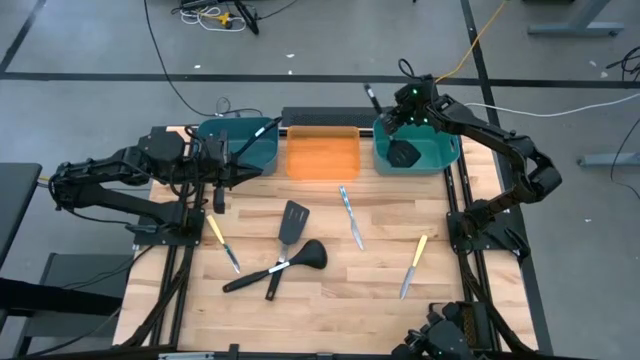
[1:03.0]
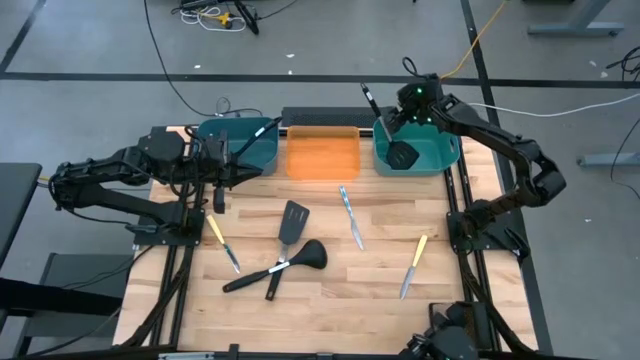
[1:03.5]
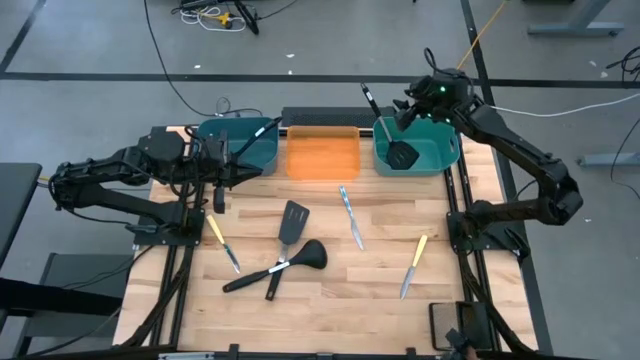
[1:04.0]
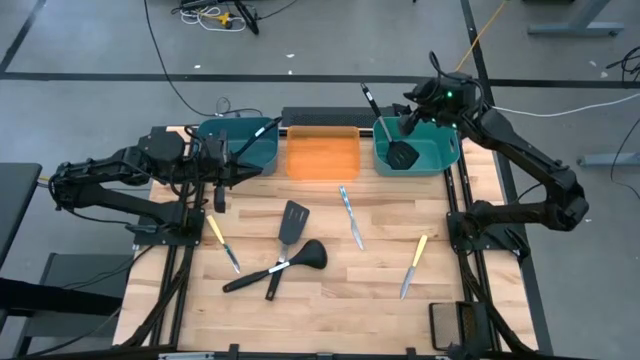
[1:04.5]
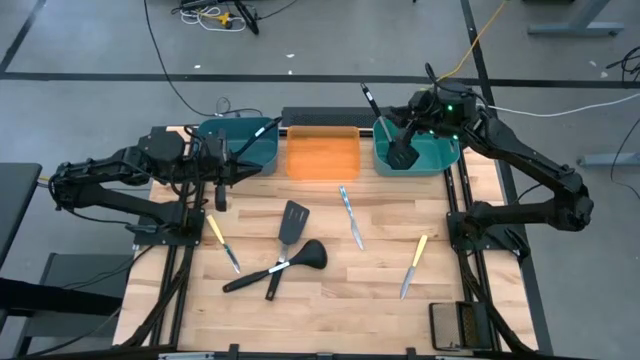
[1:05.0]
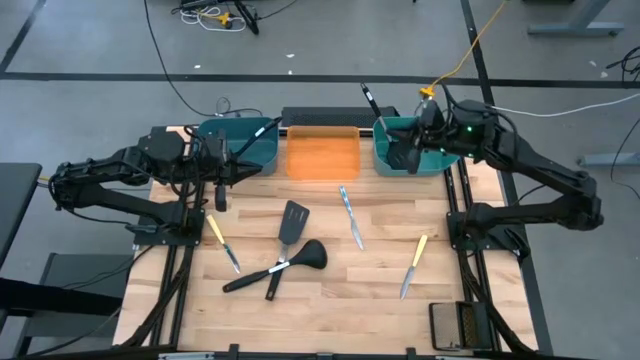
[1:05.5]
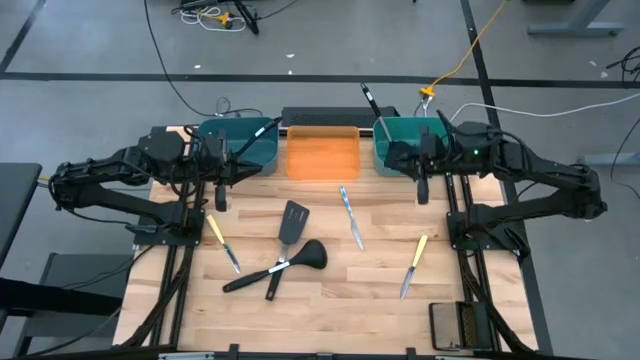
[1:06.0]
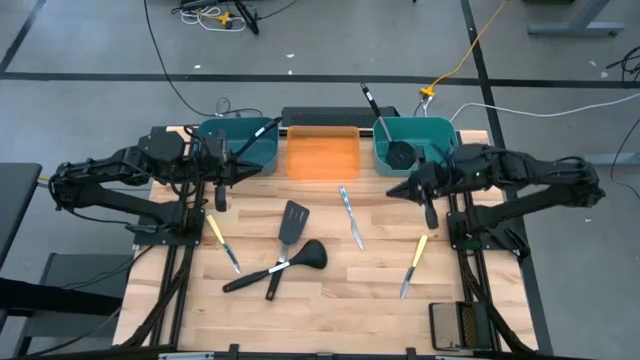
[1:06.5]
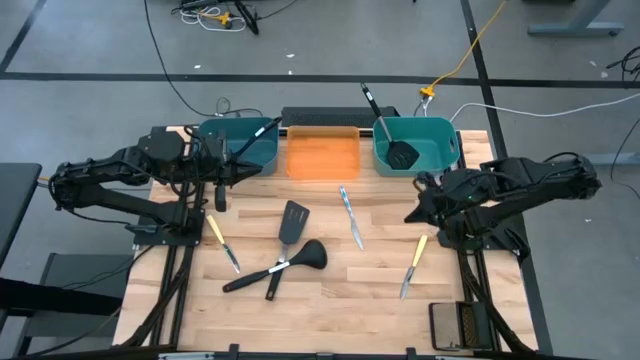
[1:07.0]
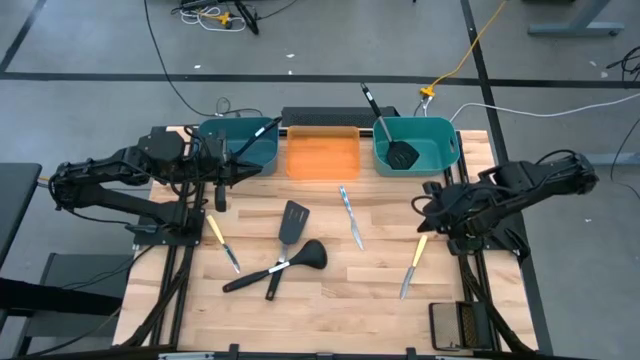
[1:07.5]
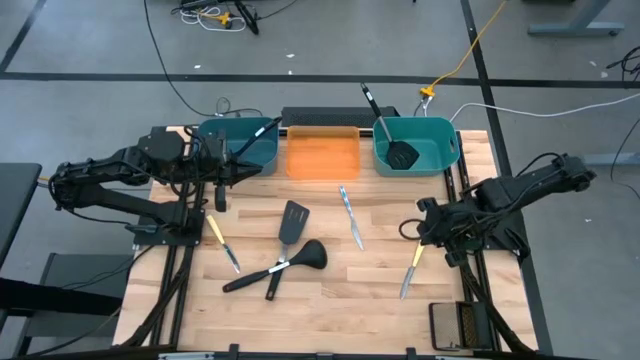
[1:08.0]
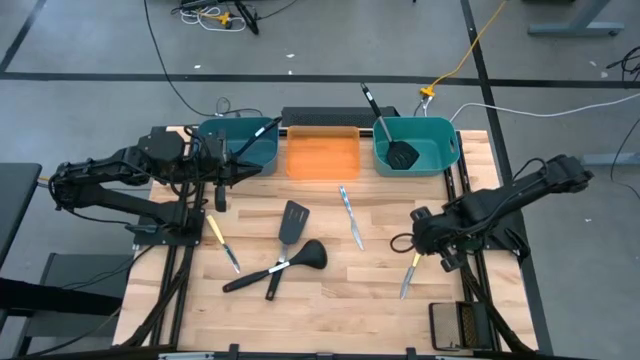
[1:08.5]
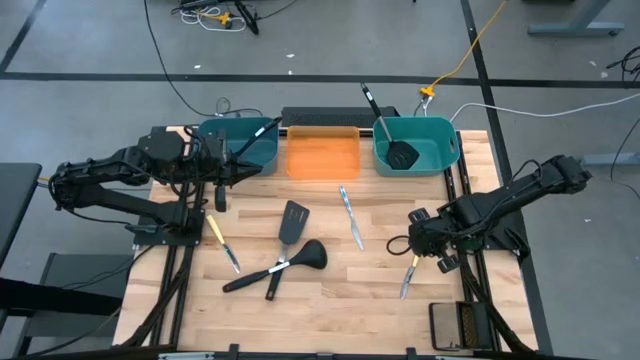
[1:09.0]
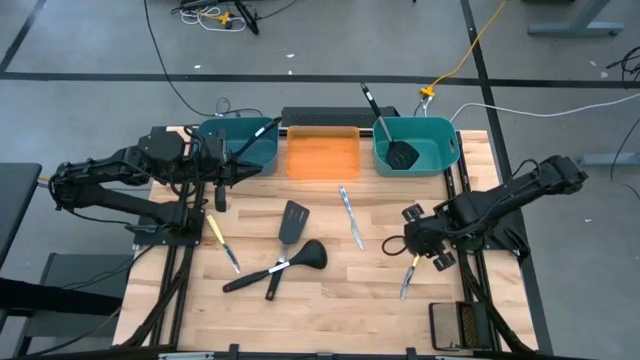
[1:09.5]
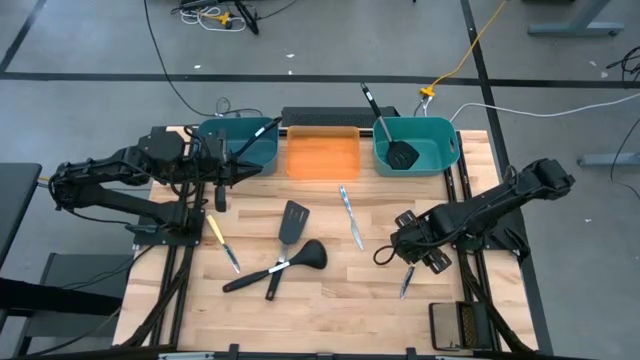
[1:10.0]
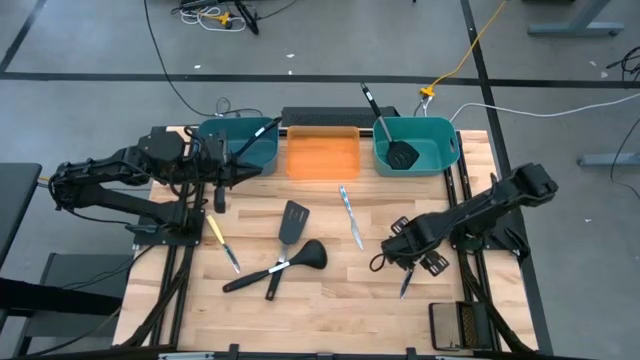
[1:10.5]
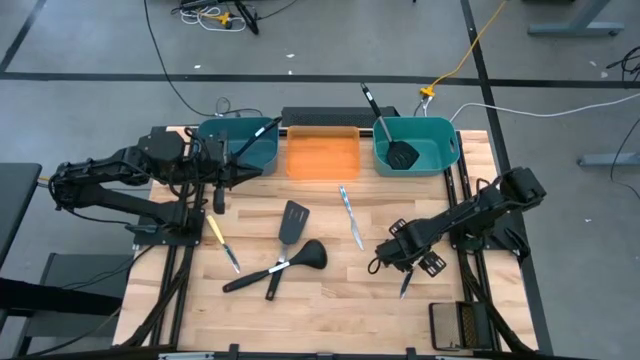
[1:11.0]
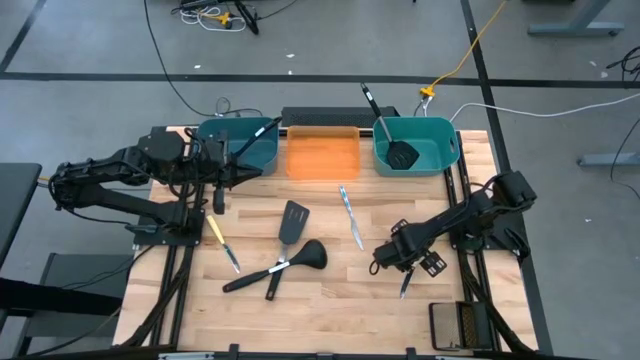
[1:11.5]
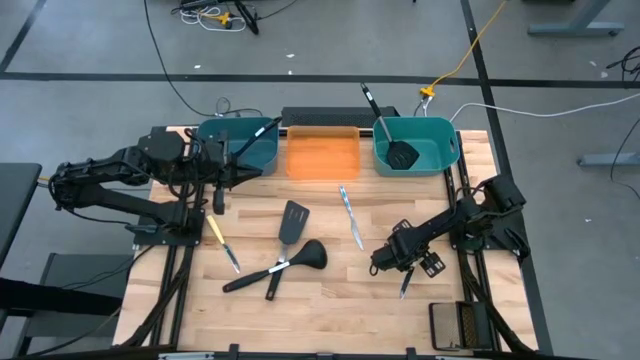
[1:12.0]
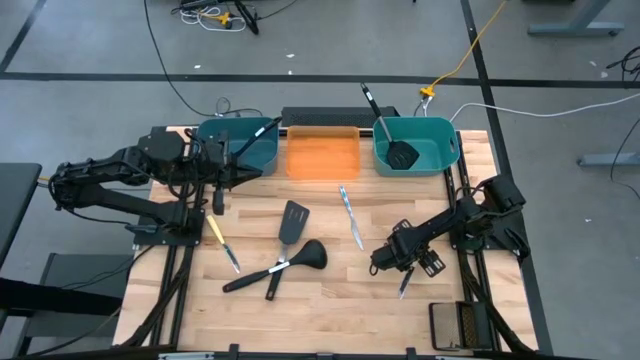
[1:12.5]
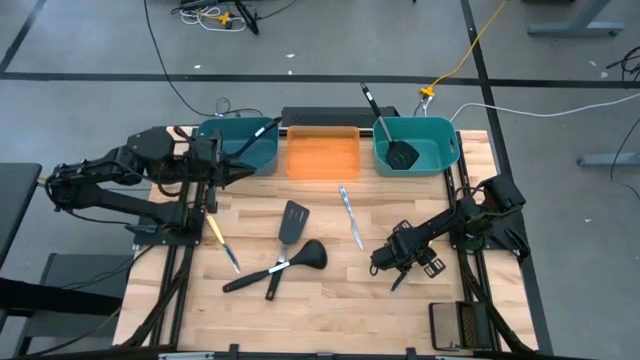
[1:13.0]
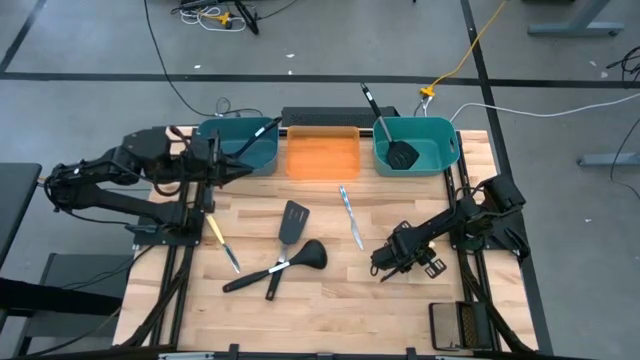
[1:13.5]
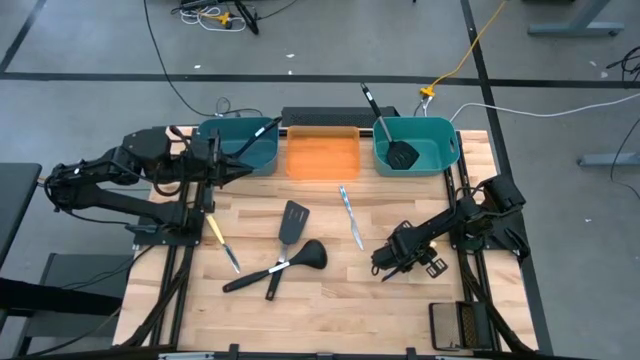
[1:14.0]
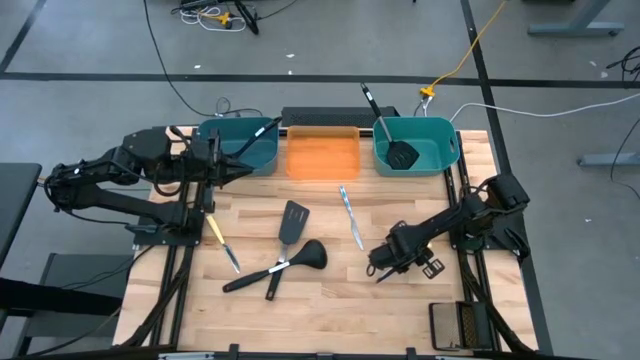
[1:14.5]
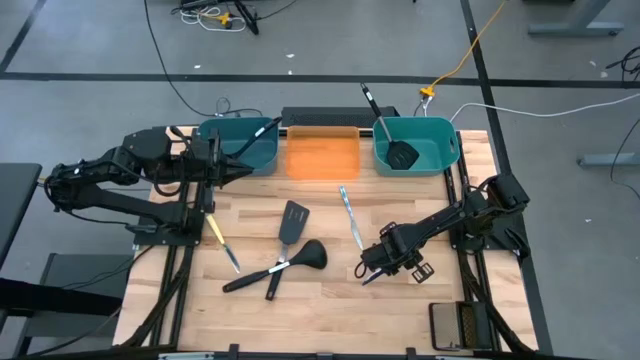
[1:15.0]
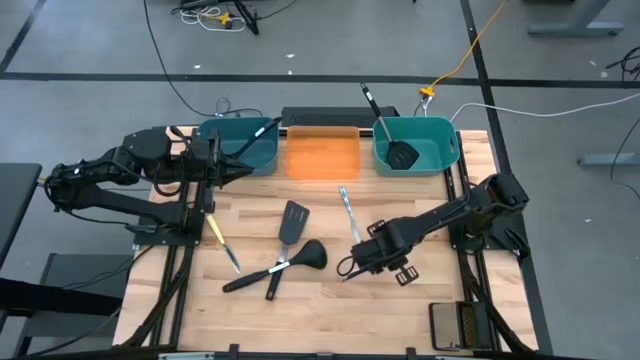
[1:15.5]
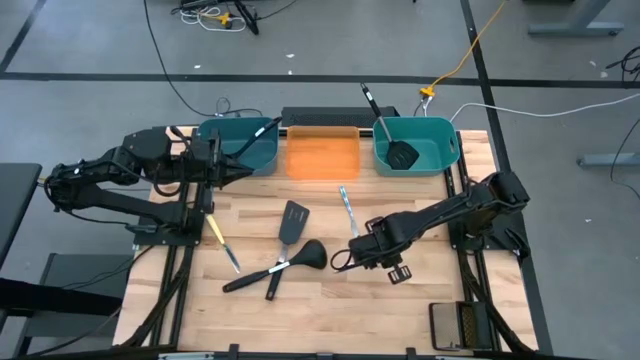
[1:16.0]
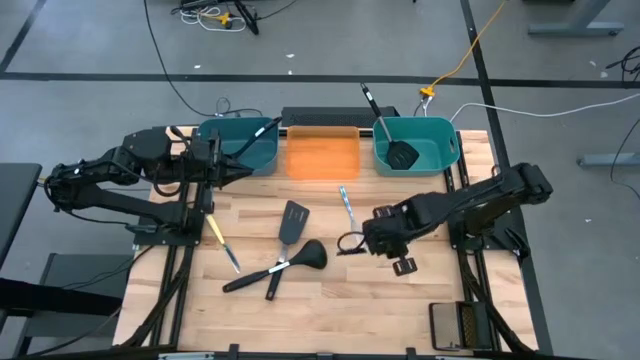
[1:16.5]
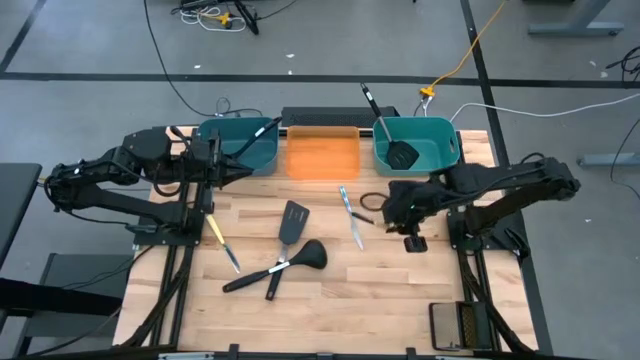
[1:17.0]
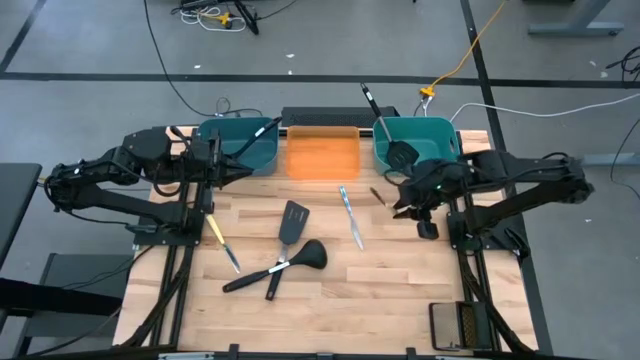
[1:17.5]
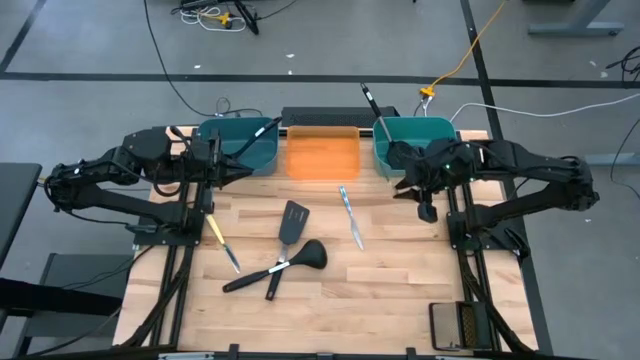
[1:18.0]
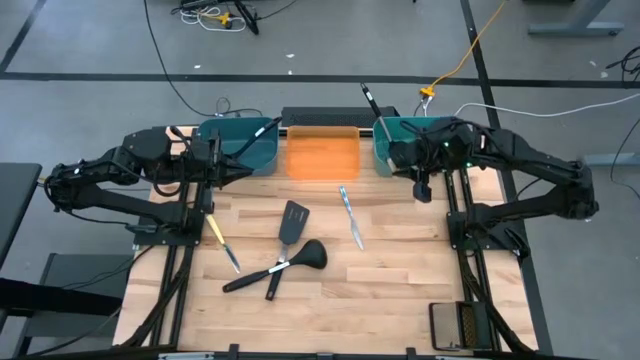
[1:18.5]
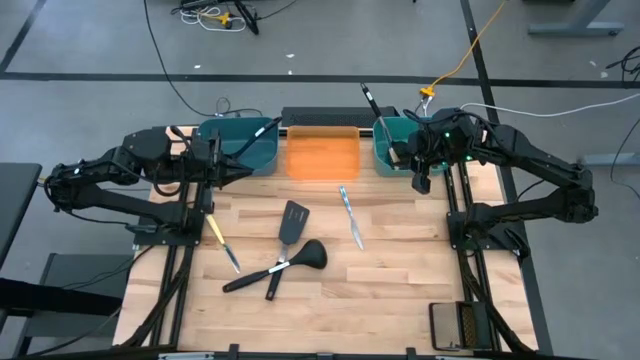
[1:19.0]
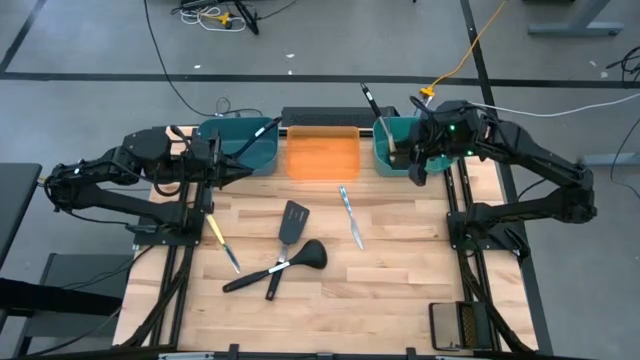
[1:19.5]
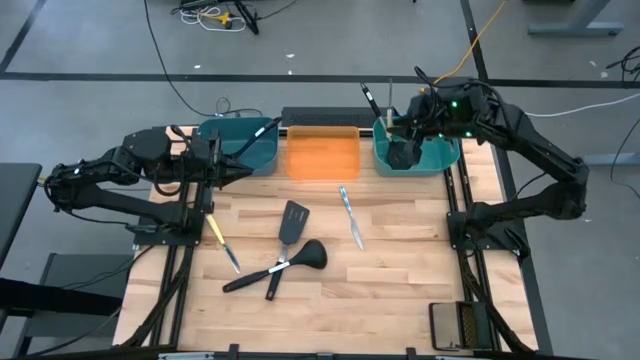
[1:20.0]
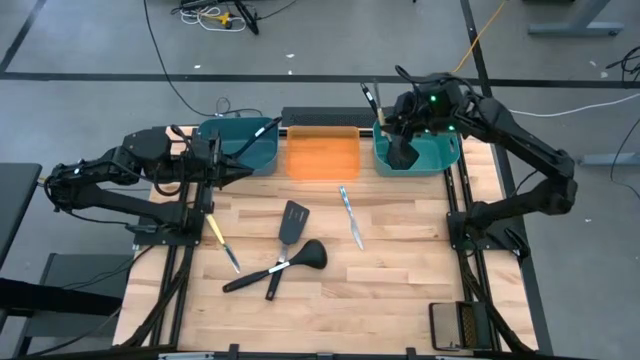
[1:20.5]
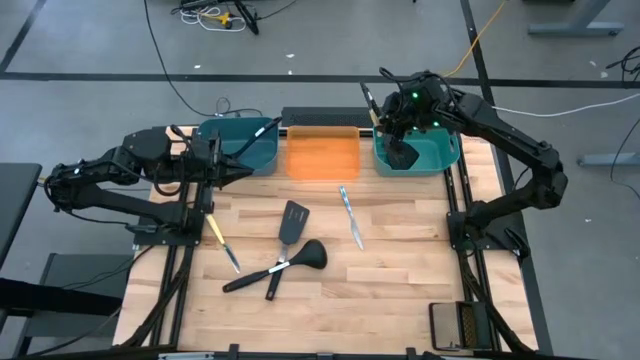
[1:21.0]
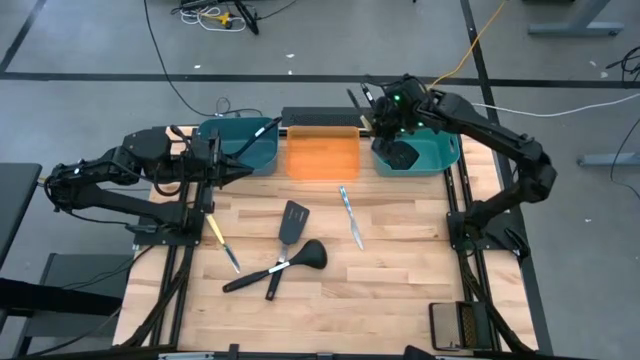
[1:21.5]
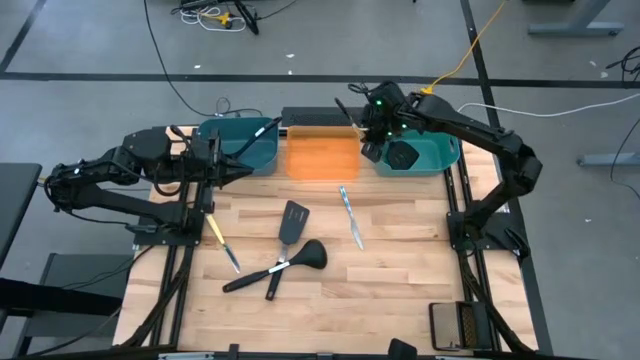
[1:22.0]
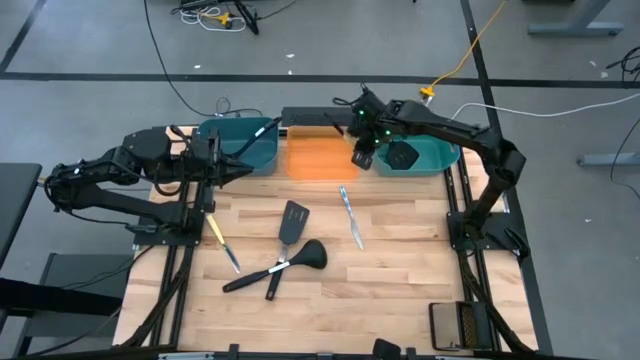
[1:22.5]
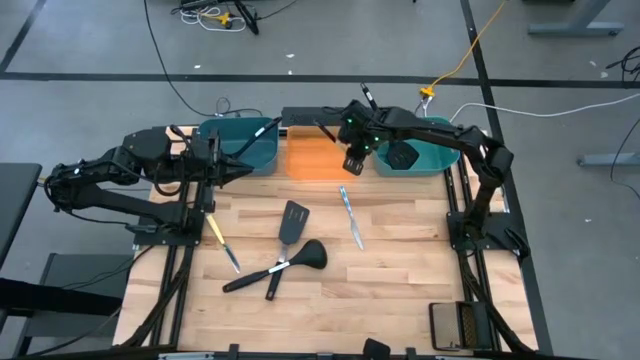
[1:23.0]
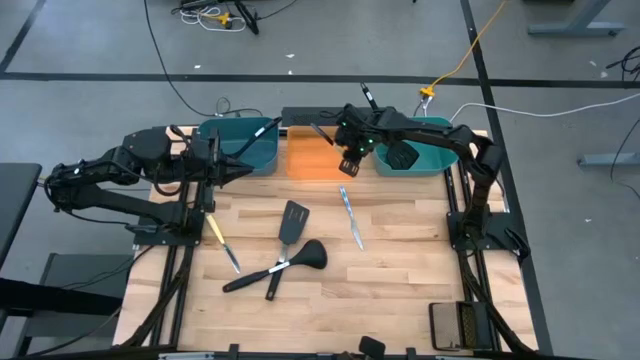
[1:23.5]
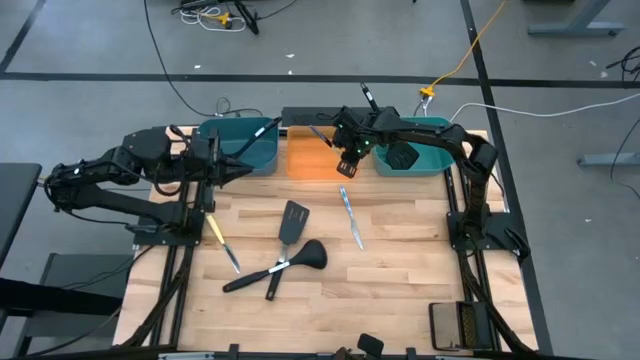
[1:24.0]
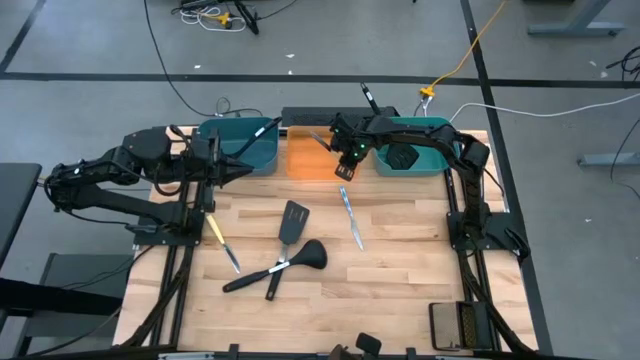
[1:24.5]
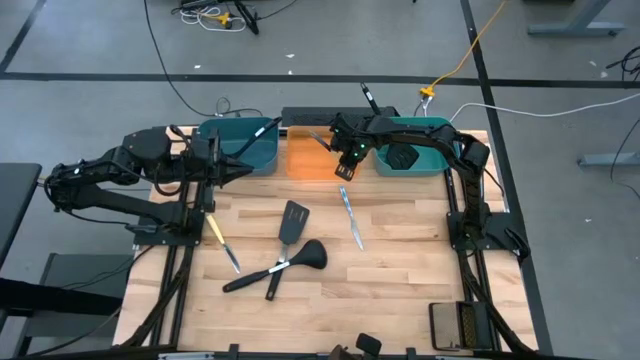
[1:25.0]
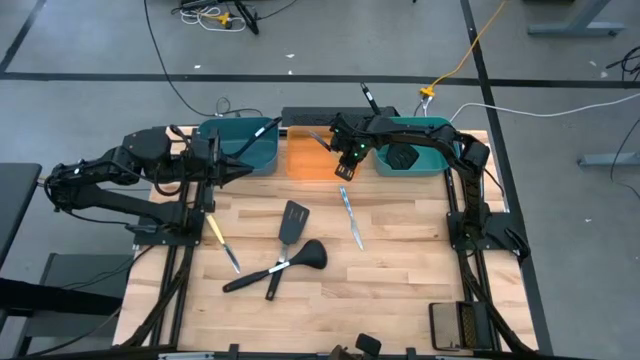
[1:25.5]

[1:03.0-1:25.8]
Task: Pick & Place Kitchen Items
Put the yellow knife into the orange bin
